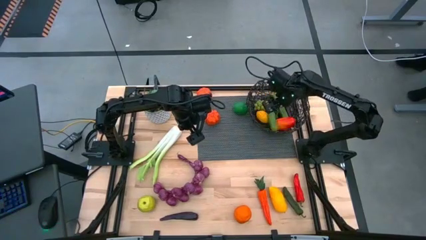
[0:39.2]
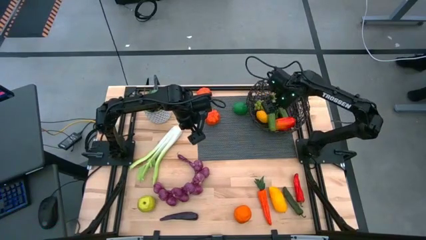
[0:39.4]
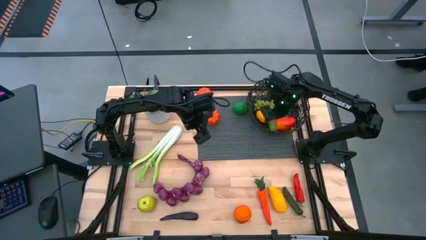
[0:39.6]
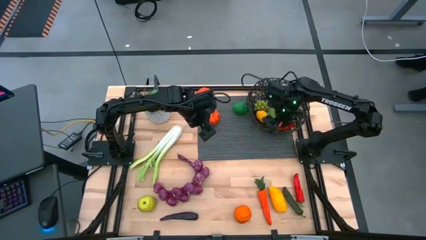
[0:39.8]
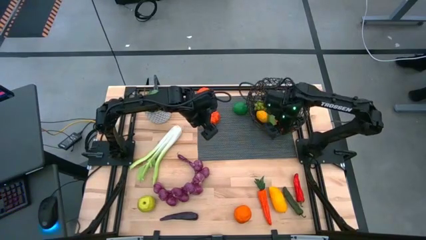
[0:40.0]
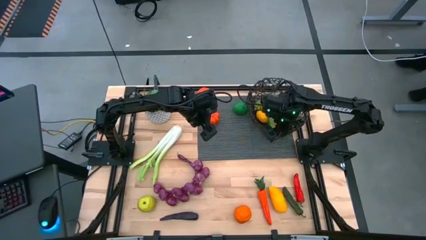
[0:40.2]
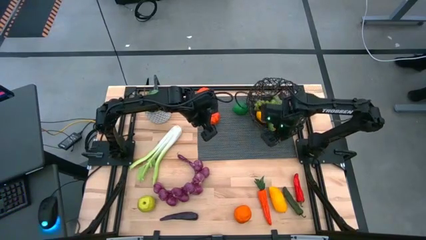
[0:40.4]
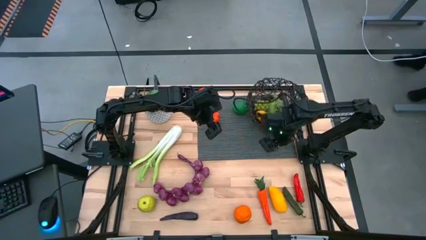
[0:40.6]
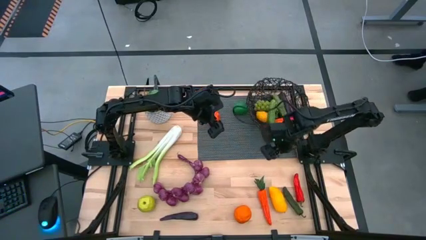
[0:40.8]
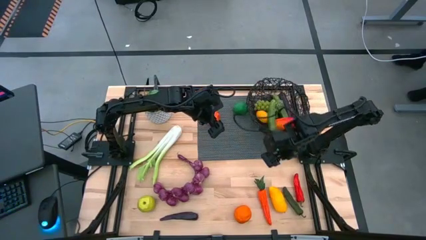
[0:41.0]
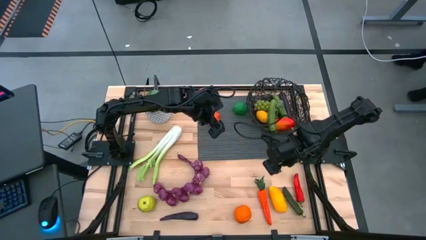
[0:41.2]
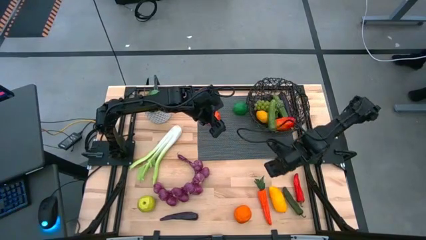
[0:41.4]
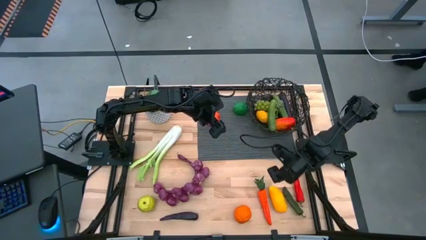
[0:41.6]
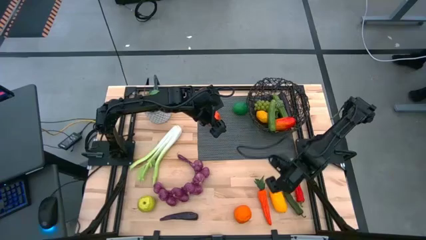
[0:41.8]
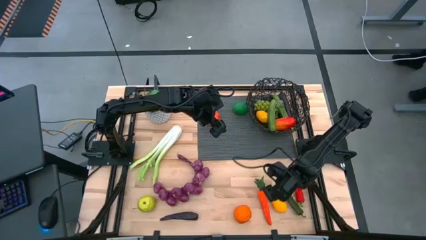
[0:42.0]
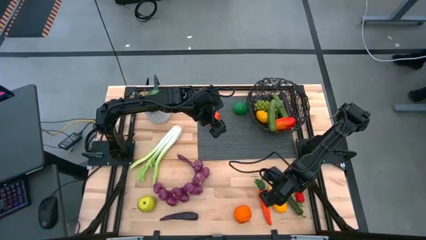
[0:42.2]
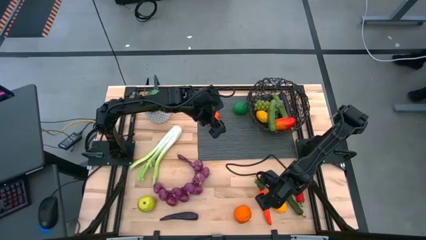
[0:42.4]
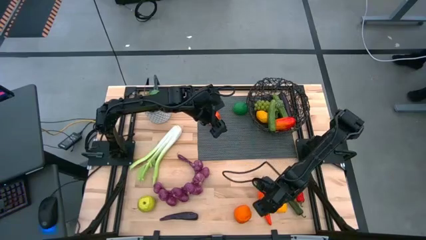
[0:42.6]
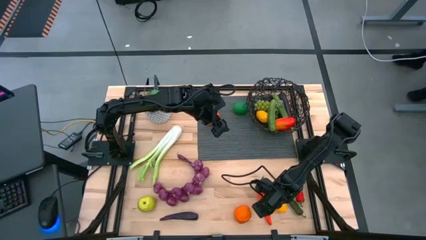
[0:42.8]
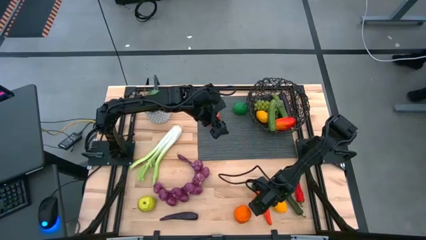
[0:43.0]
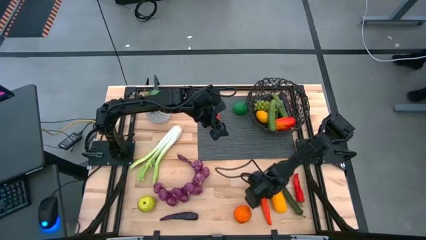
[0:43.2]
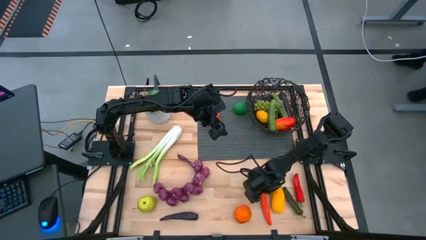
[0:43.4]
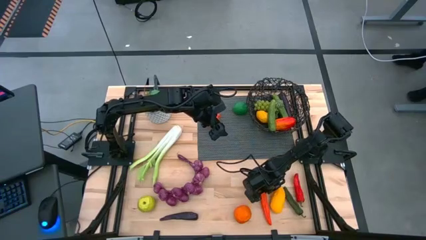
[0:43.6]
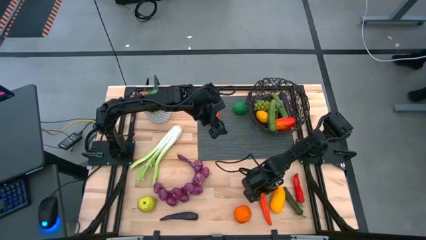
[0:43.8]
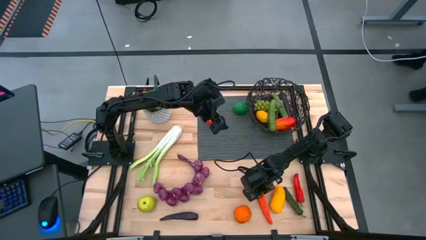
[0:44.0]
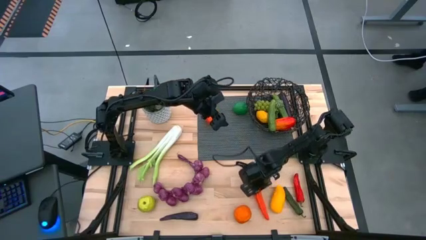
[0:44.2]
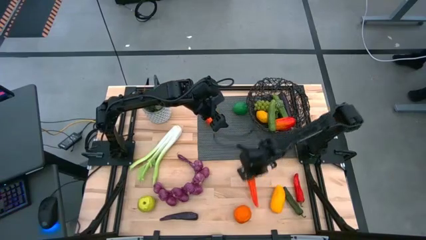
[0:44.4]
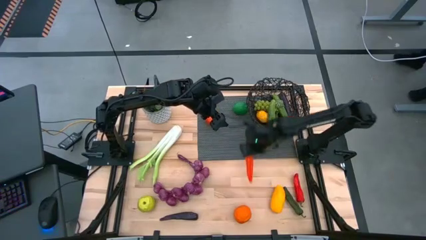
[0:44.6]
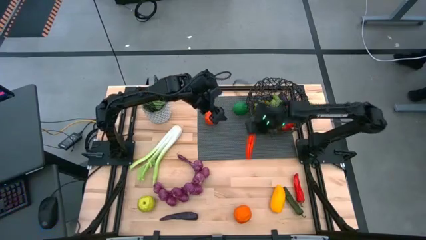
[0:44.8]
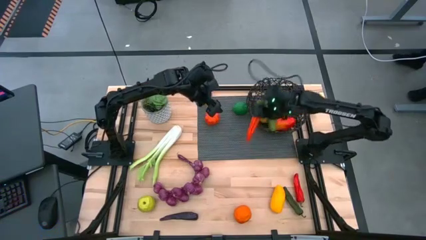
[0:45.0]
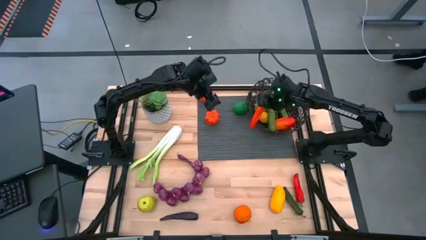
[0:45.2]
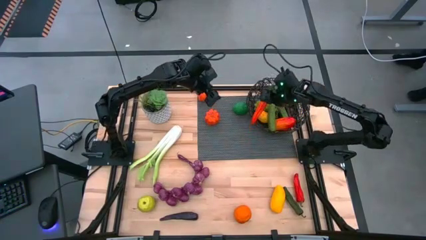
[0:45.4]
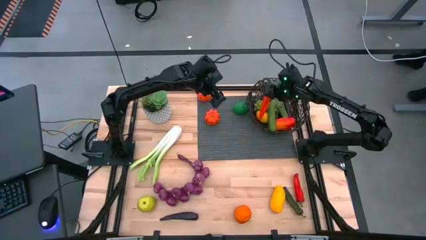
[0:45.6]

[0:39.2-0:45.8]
Task: Build produce basket
Put the orange carrot into the black basket

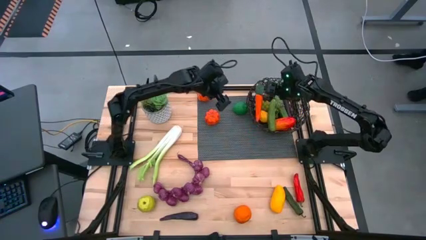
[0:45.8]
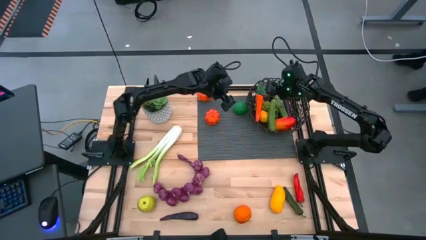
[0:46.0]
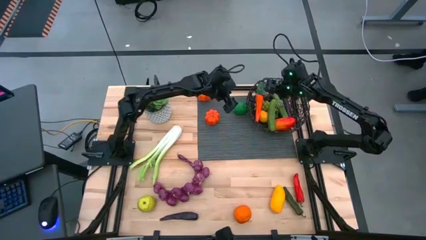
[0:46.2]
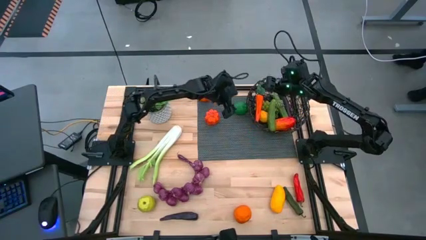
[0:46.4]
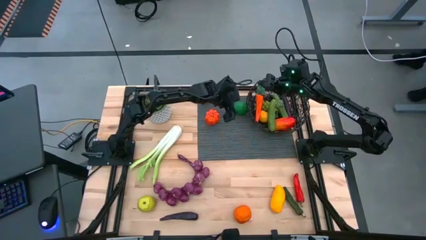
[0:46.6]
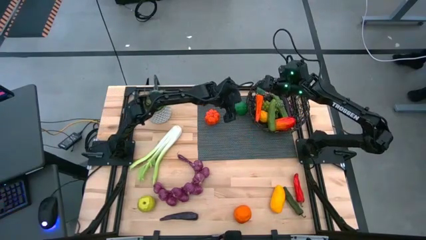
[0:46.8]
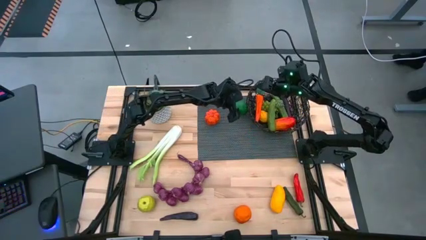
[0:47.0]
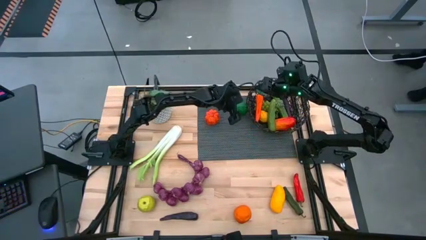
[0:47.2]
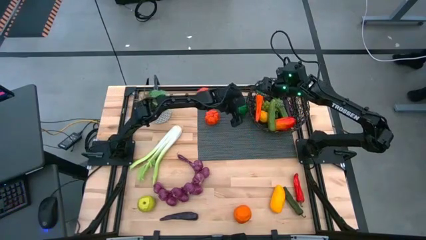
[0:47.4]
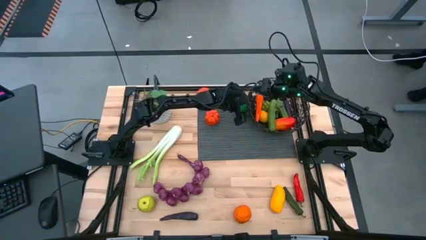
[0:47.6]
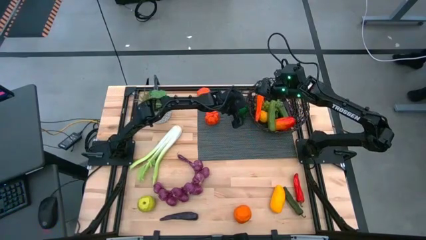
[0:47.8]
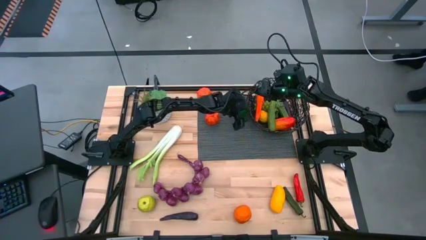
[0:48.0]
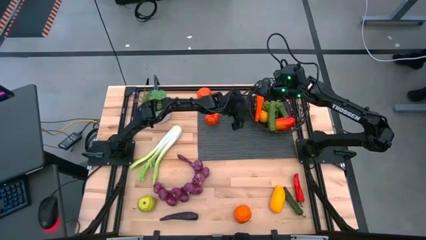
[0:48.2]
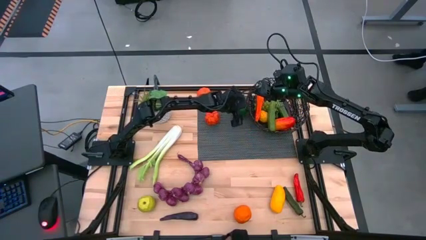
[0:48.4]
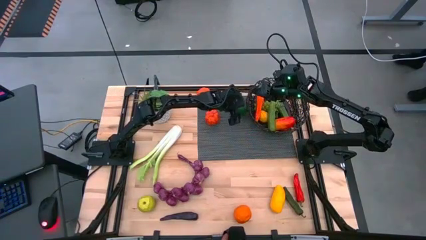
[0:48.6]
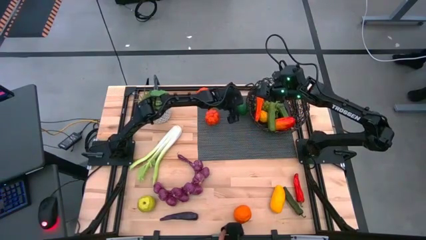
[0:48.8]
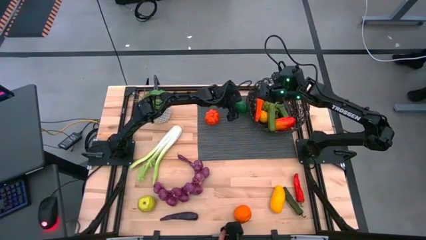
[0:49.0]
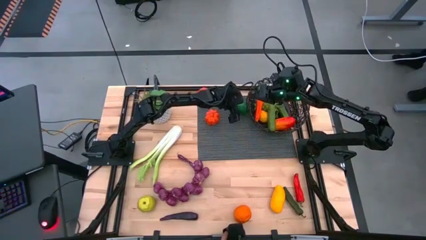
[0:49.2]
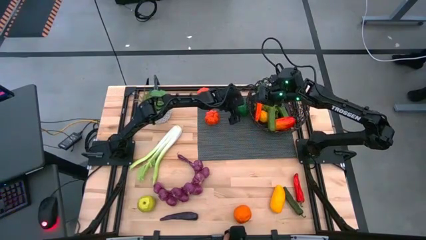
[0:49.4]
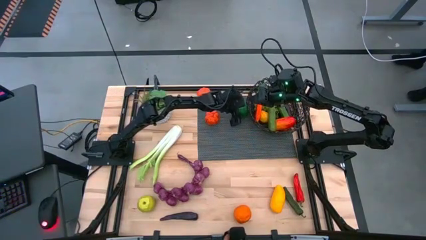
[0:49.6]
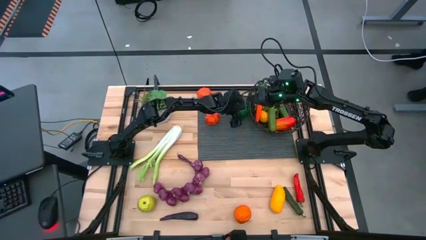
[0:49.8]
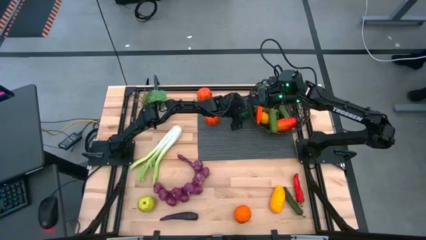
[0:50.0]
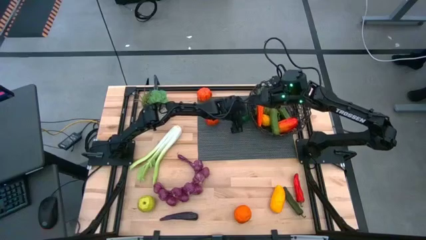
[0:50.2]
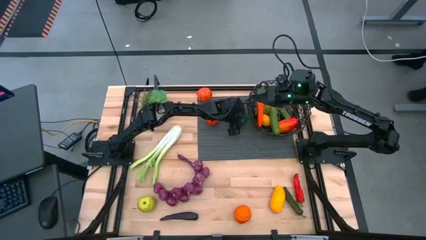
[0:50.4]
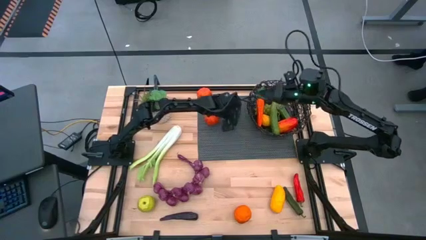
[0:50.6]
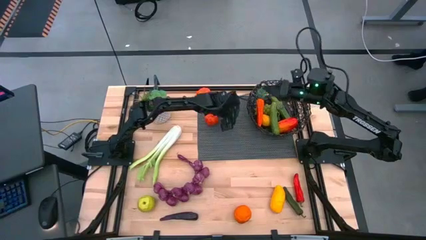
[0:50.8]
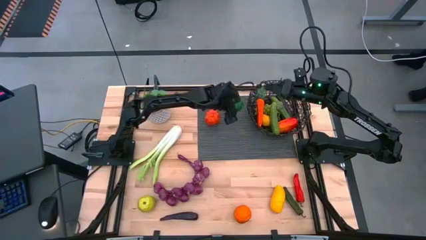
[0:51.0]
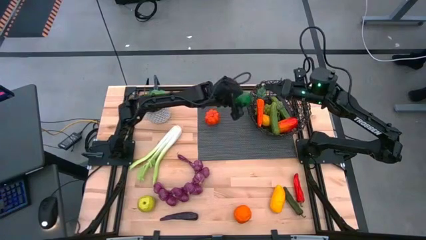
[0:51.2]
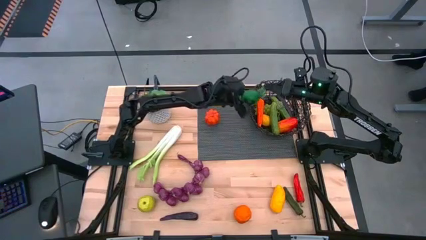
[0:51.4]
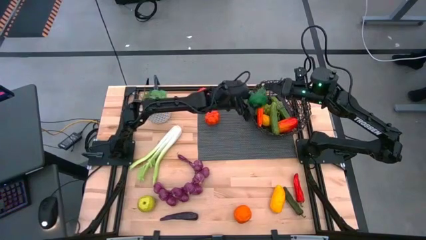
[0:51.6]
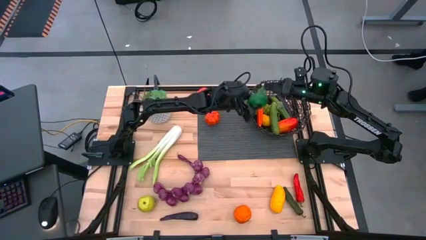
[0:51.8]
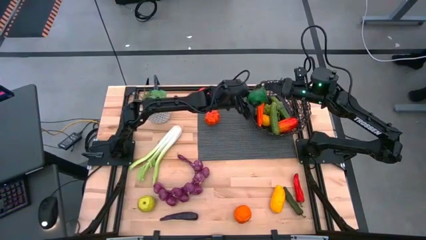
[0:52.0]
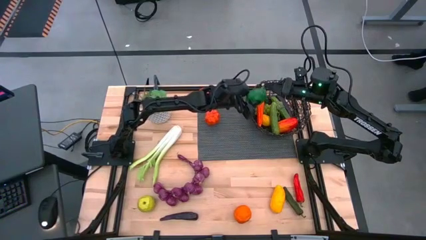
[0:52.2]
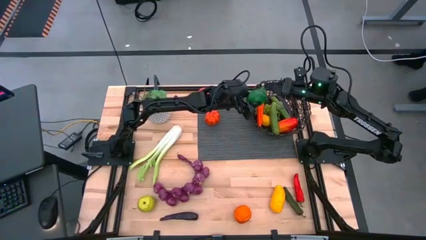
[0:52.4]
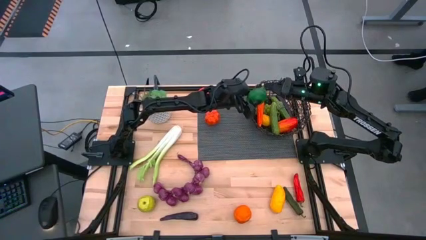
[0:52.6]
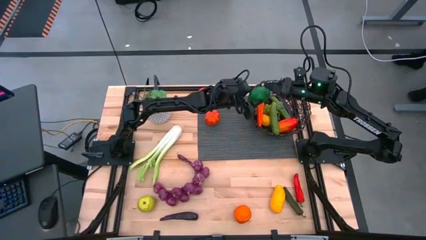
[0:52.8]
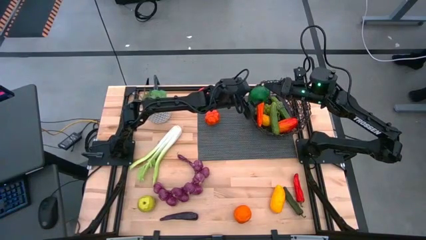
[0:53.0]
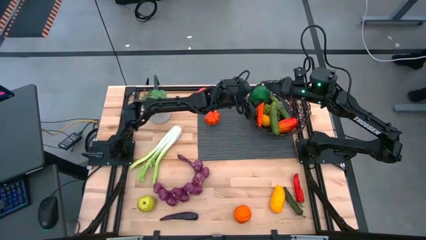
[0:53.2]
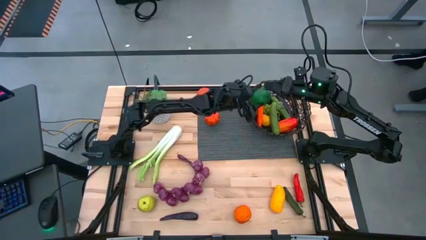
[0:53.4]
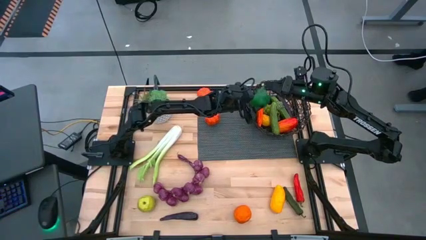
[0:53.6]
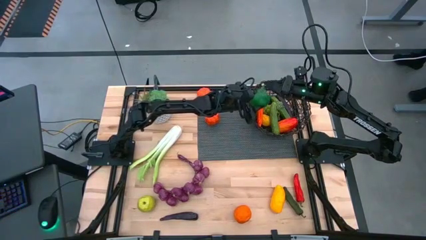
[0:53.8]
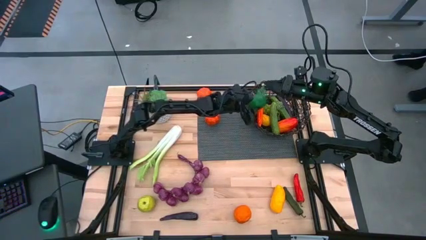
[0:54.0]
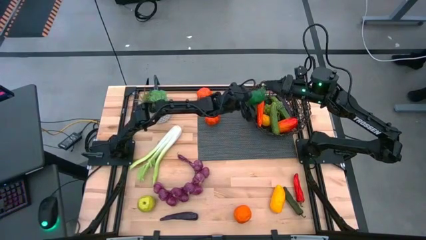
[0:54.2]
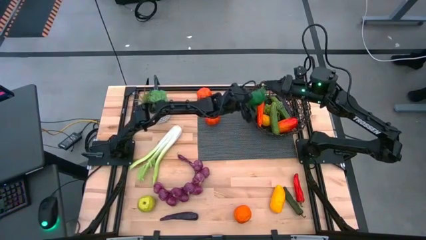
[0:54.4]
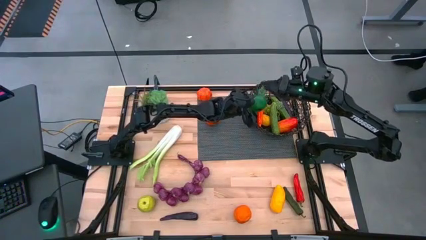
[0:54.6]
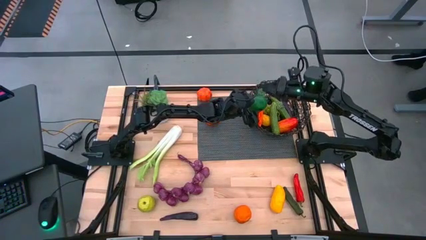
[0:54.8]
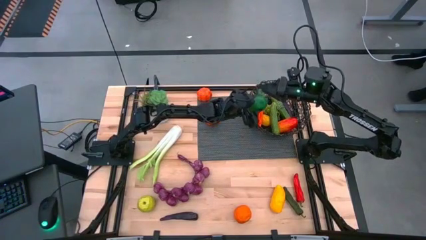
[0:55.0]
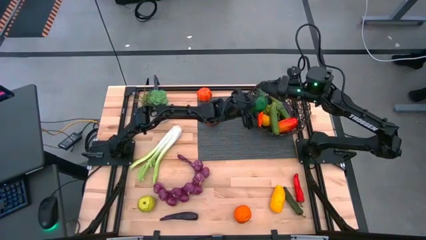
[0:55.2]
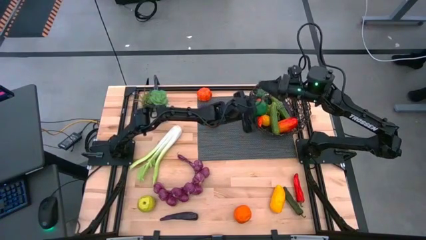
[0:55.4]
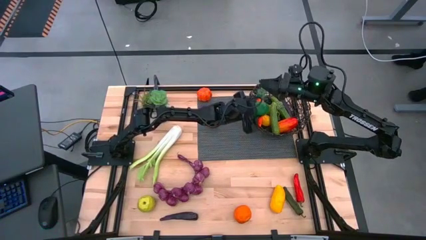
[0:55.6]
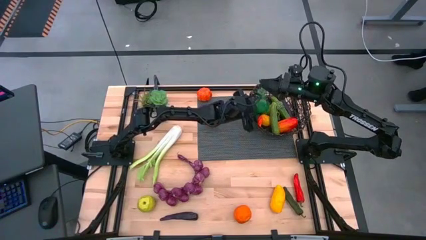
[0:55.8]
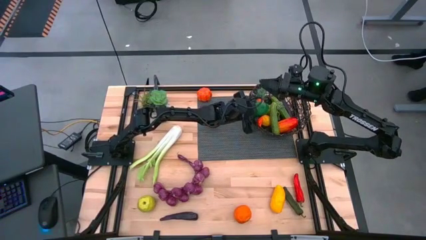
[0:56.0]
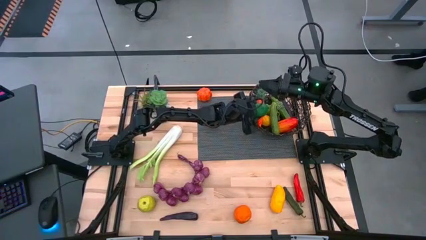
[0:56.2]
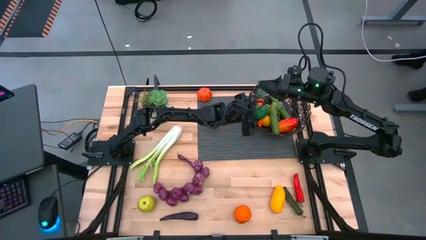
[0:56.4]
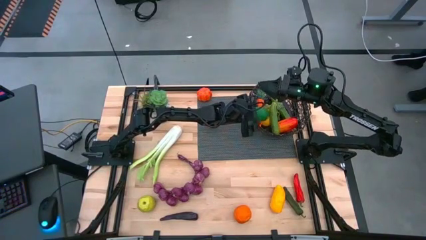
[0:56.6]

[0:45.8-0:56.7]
Put the green lime into the black basket
